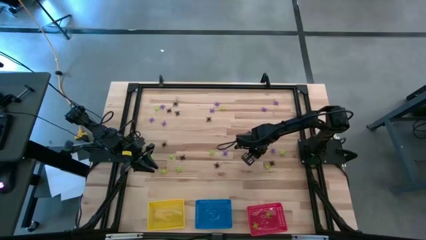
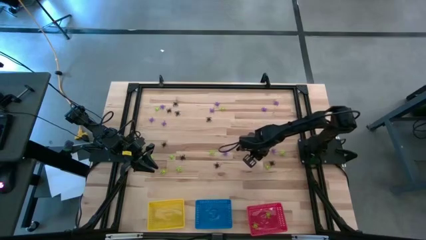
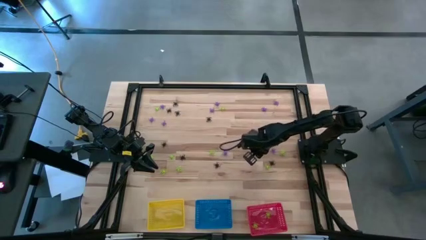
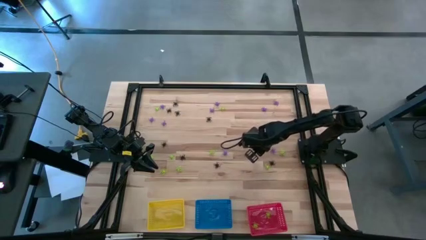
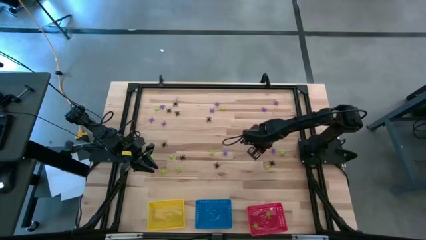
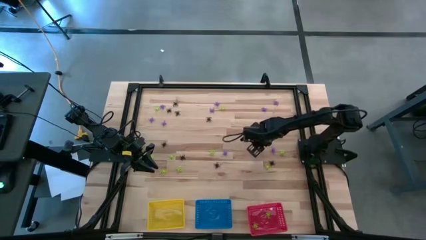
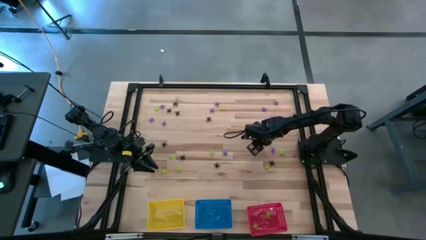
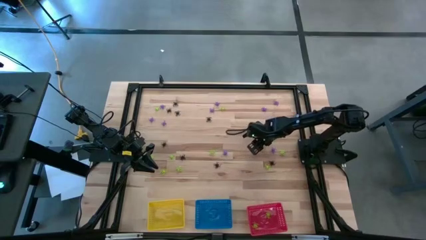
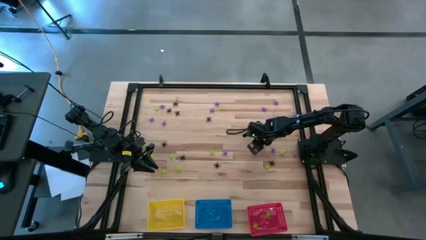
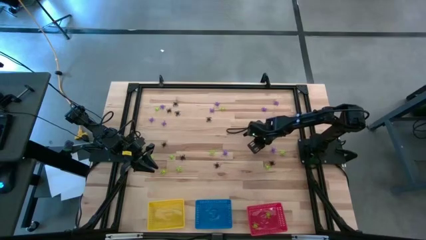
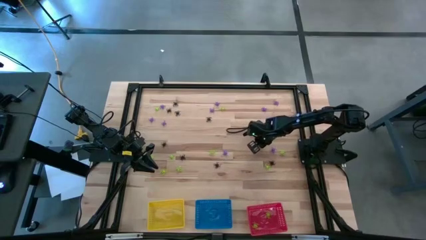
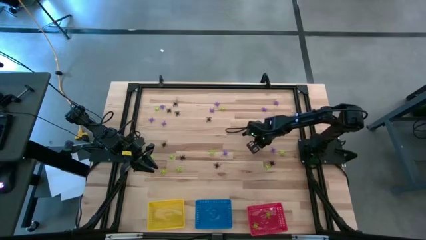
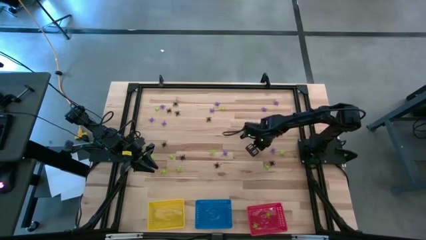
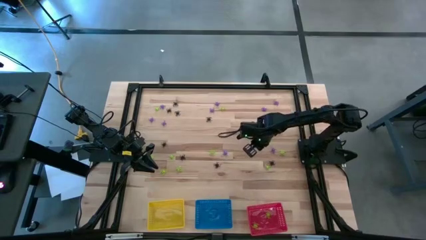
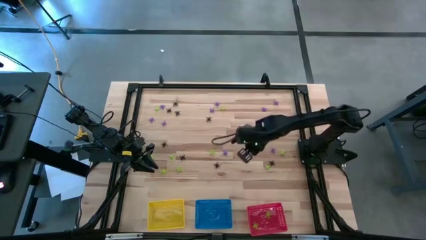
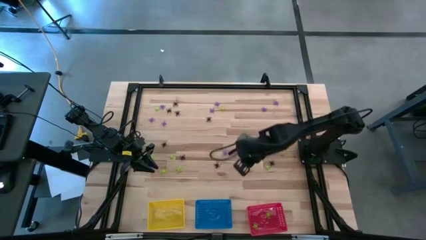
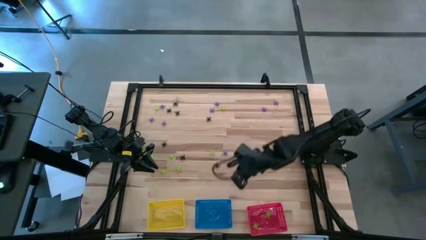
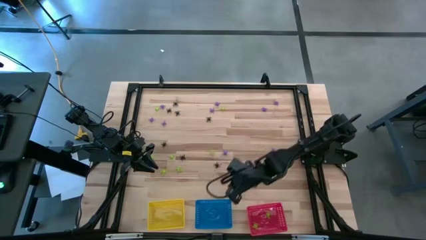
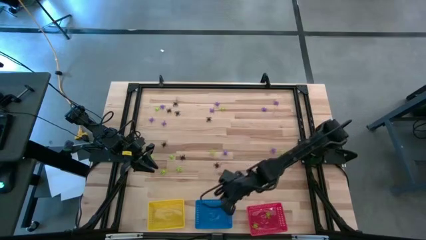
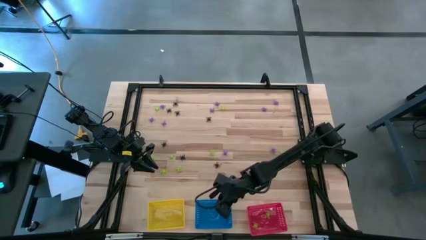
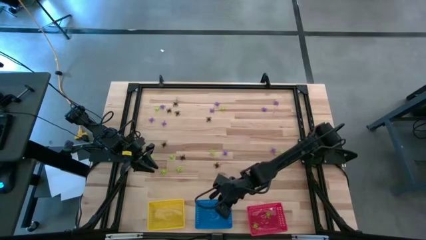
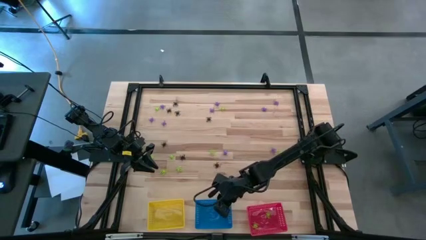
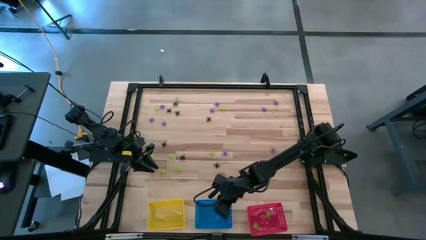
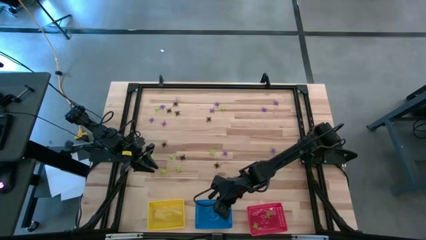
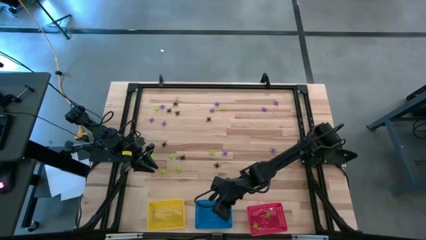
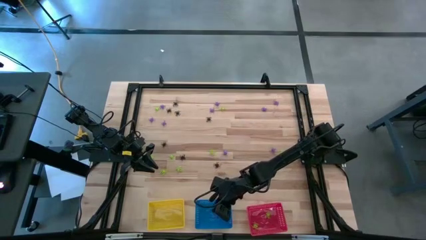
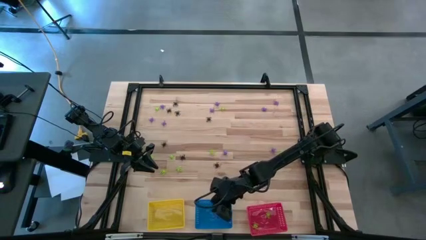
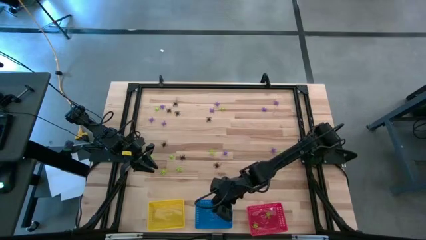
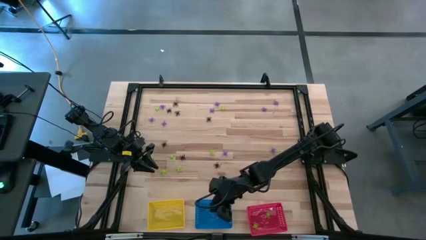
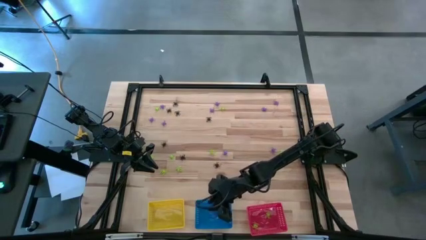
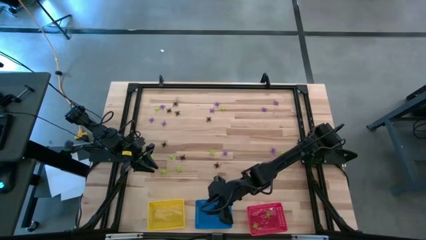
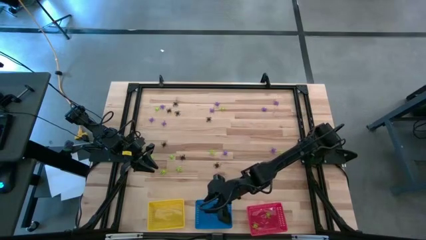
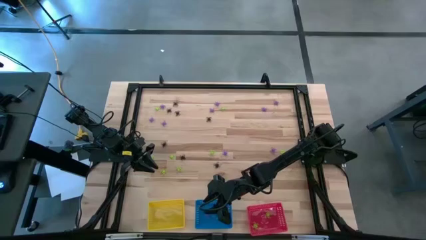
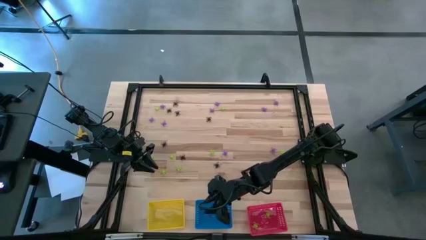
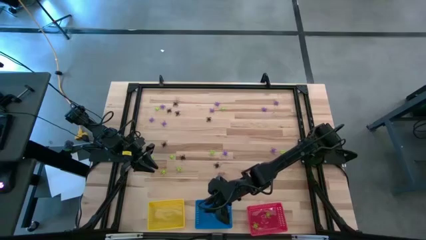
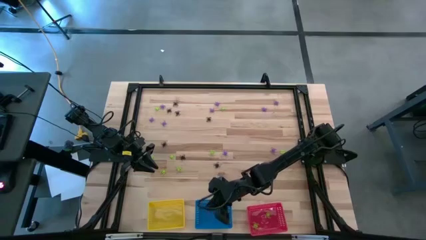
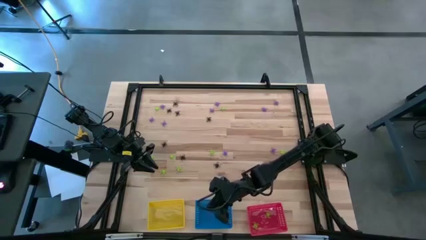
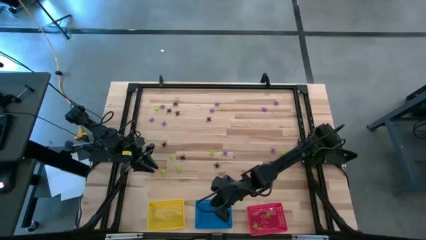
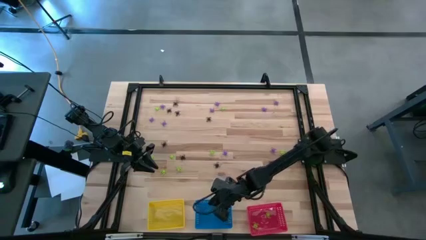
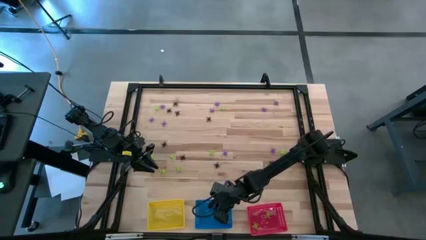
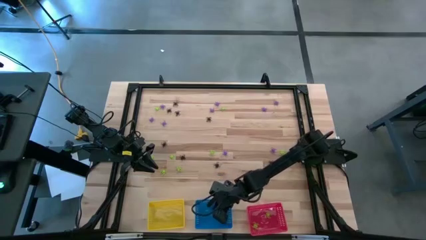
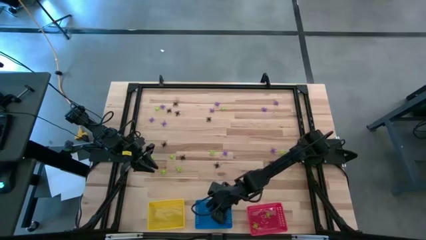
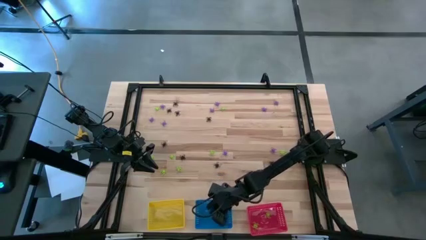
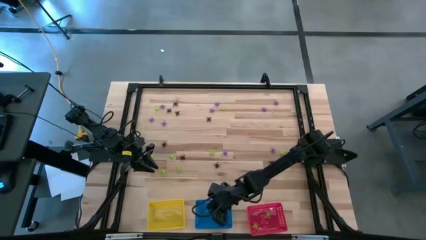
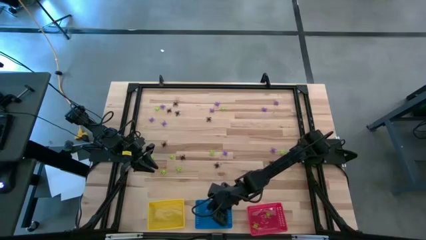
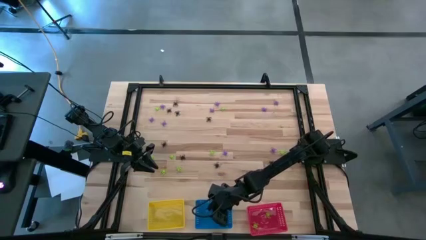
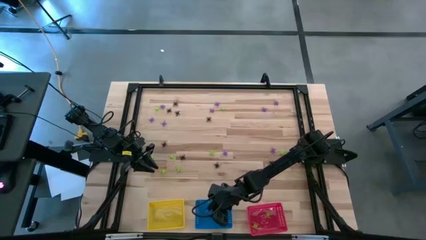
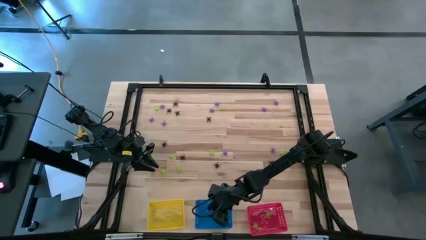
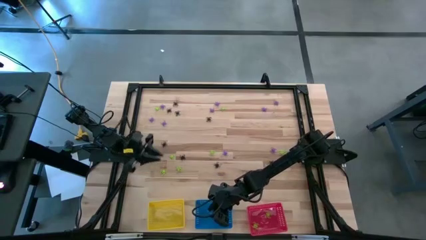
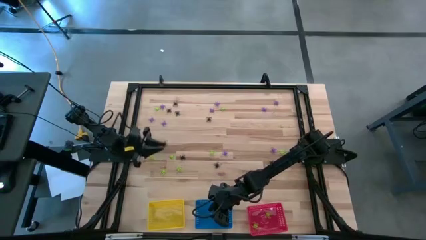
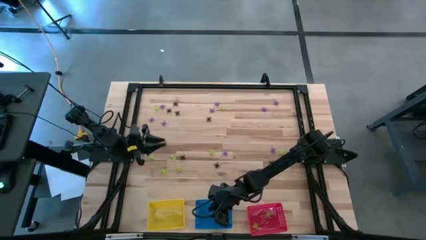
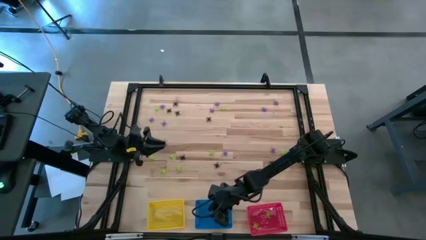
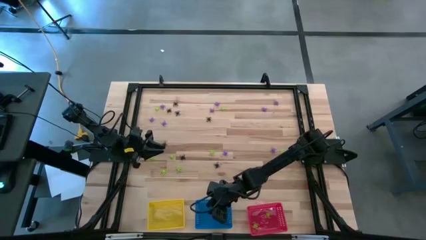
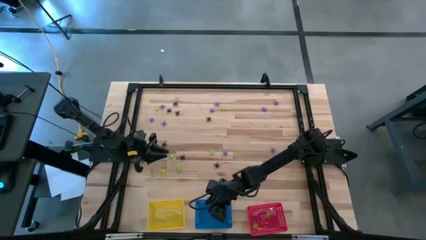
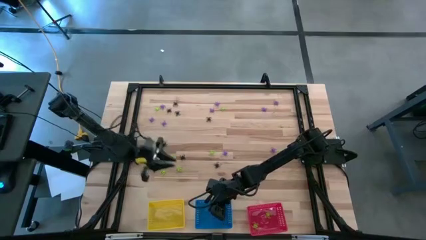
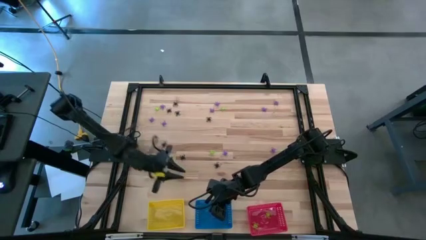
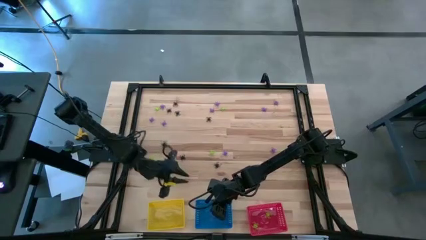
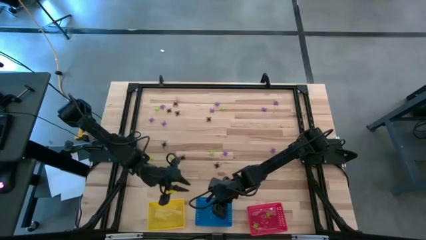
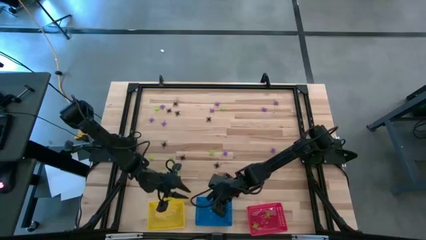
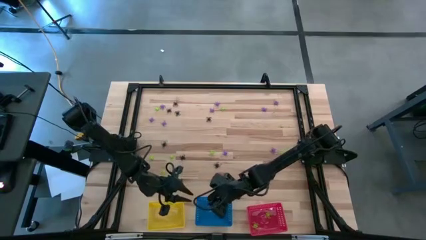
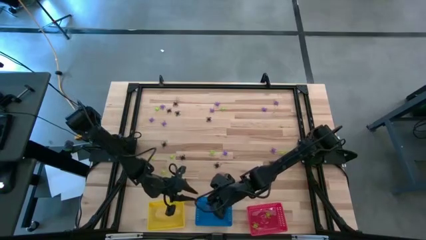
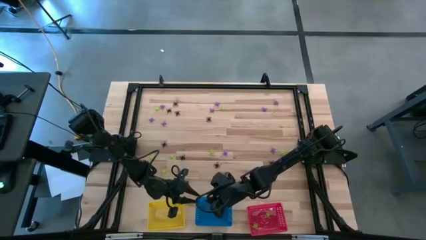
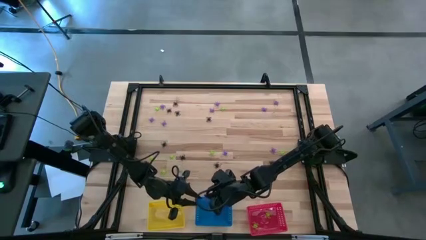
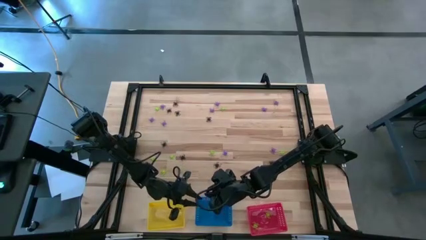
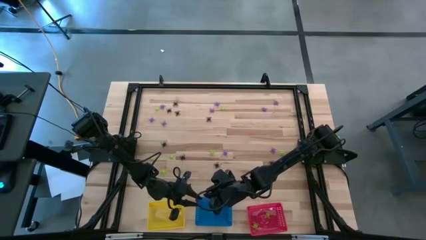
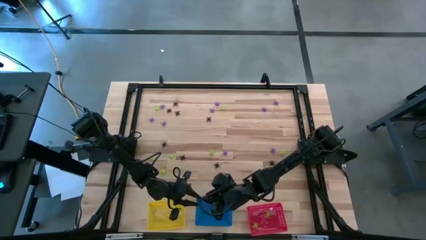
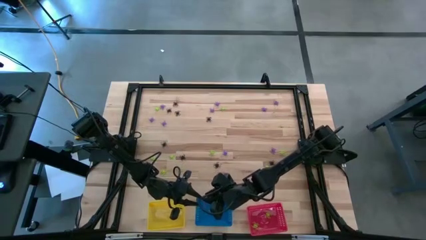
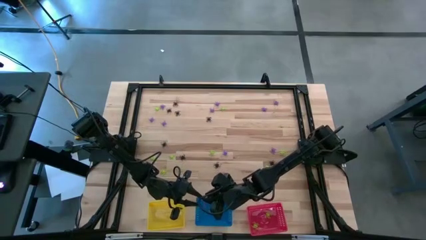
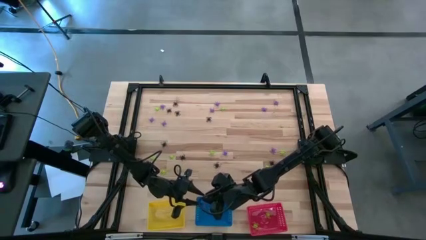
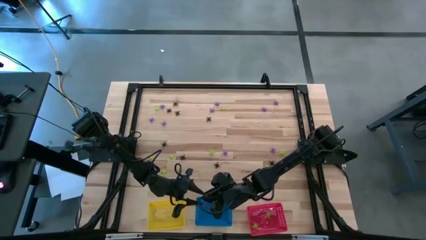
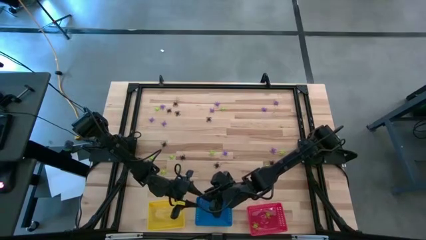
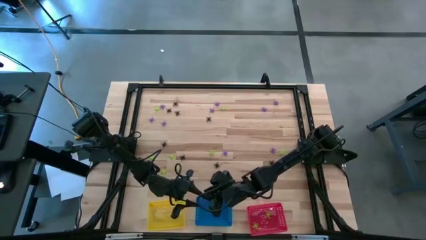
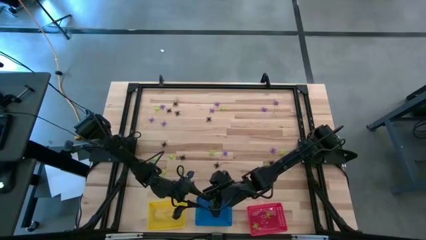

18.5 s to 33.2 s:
Task: Sort Halloween decoration
Put the violet spider toy into the blue bin
